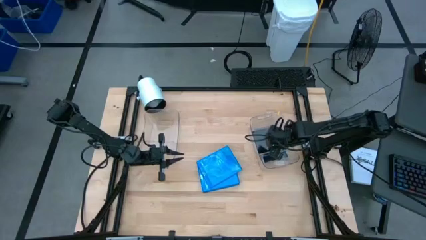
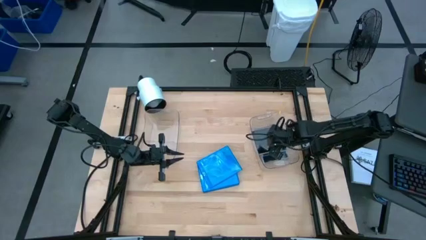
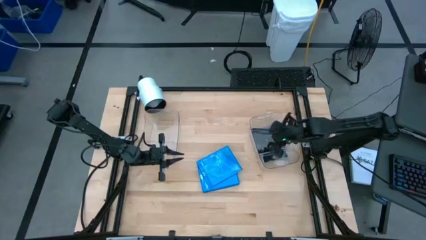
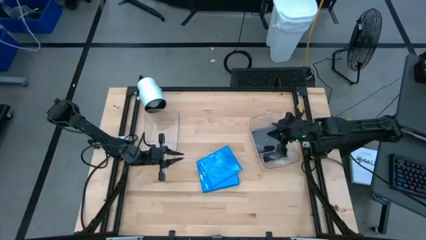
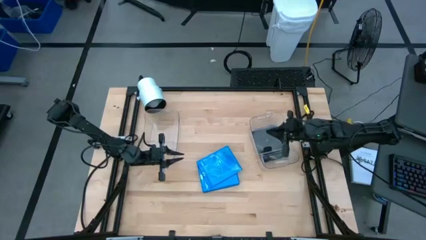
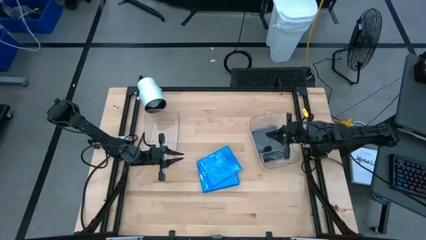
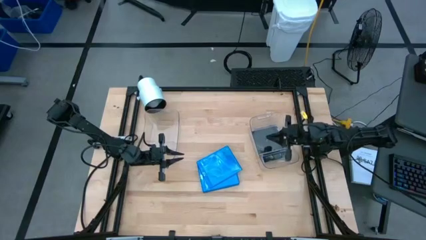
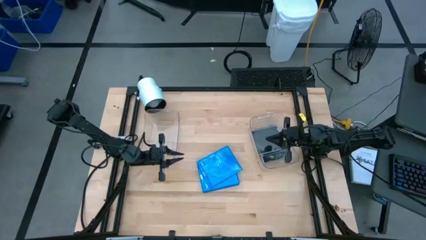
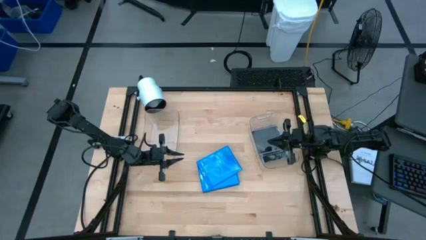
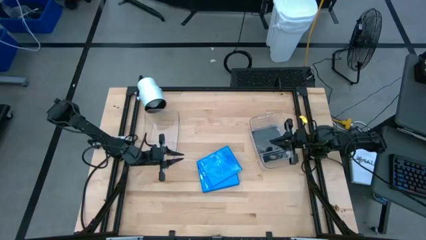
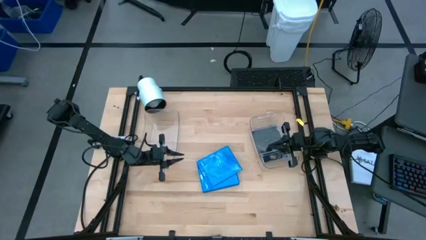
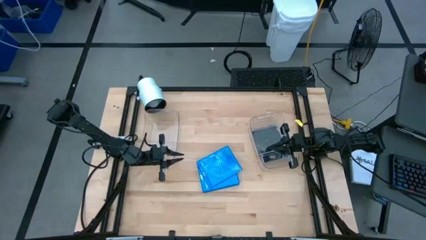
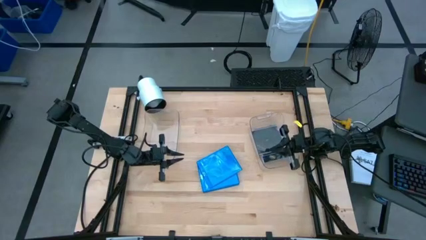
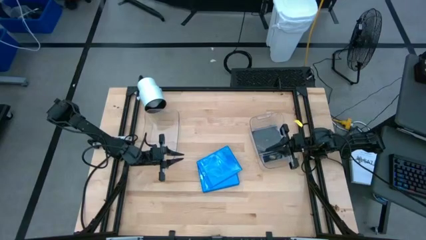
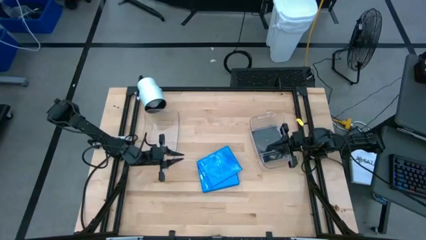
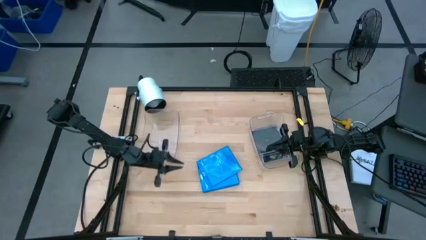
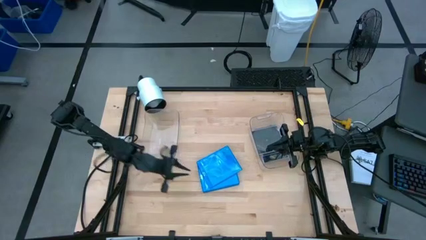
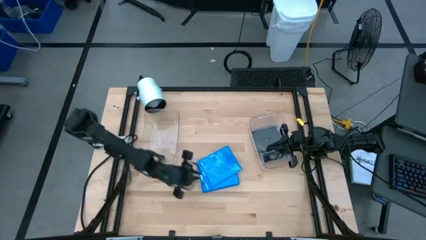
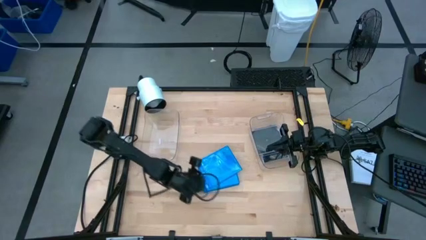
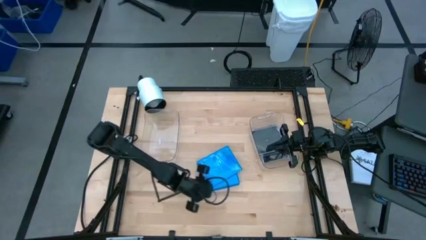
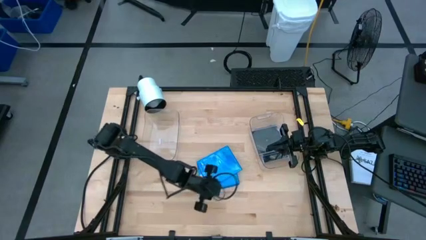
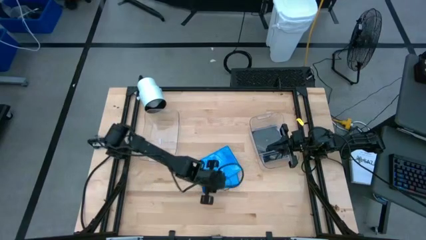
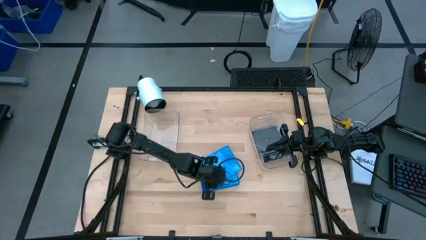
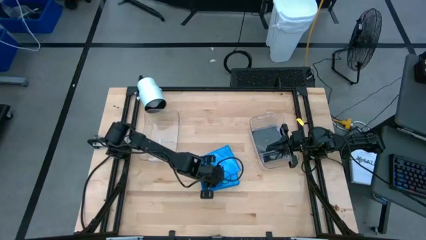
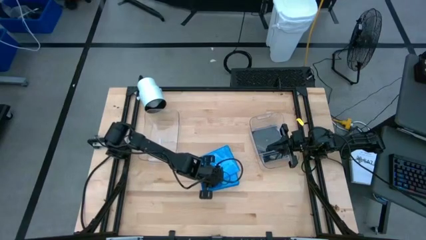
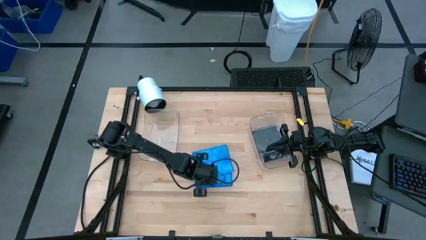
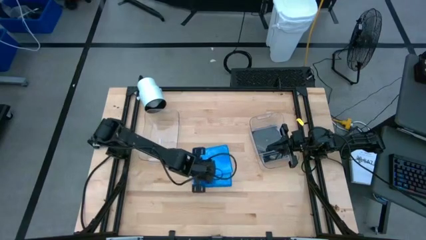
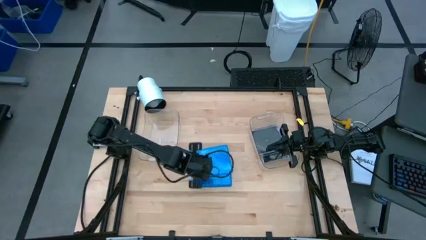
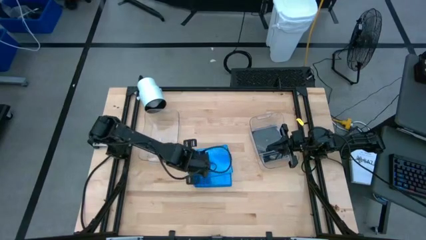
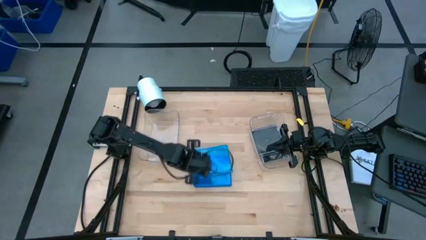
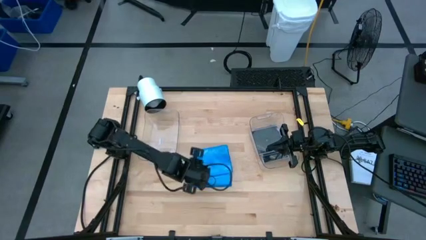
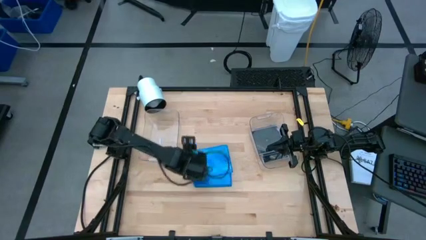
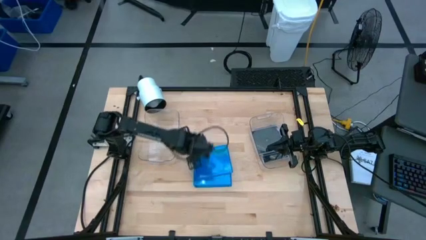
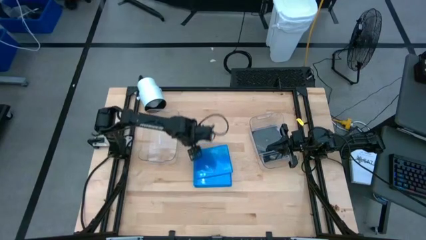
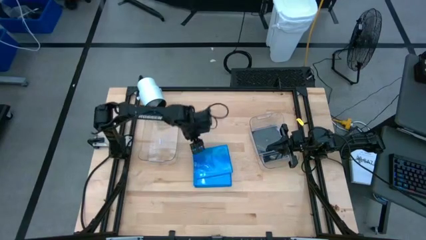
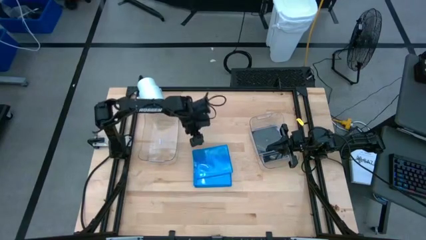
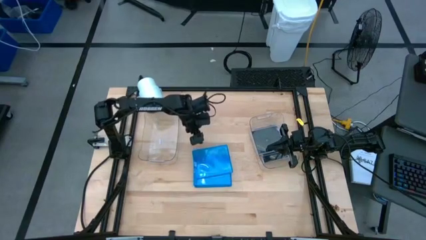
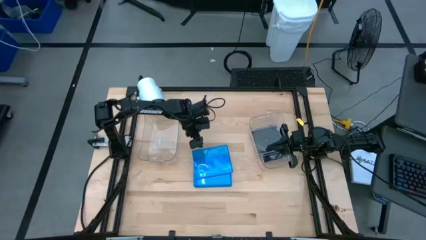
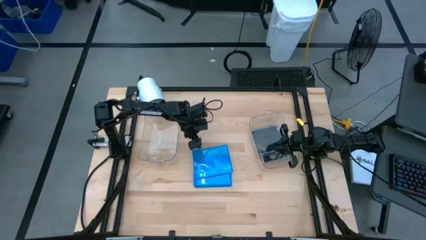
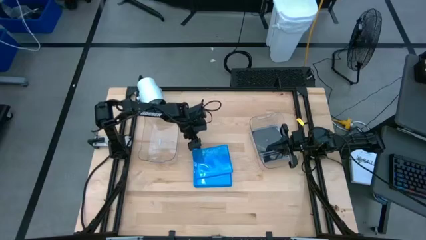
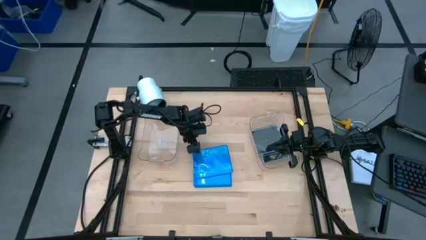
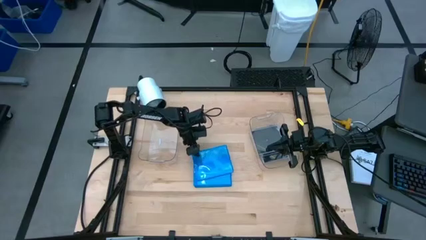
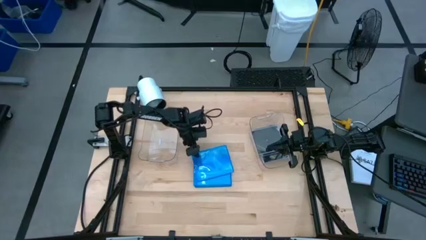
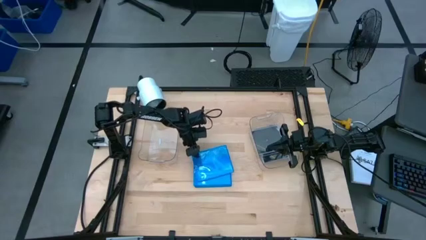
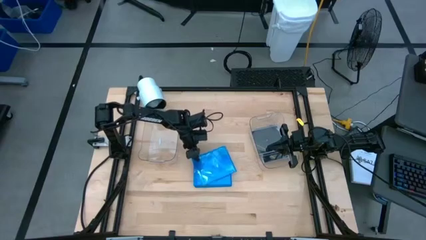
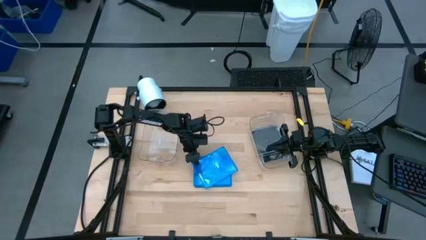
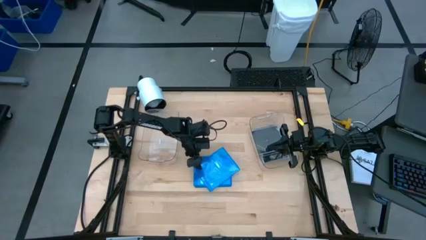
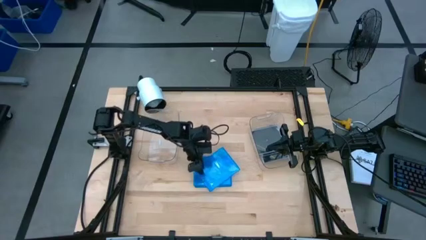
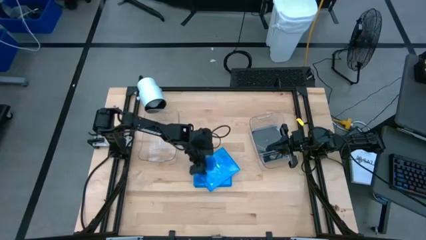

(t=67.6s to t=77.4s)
Task: Pick & place jewel cases by type
Put the blue CD case into the left transparent bin

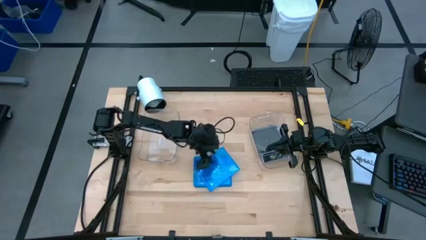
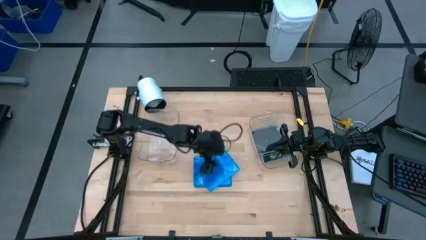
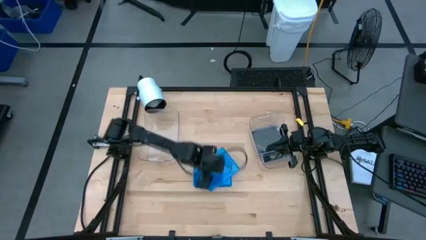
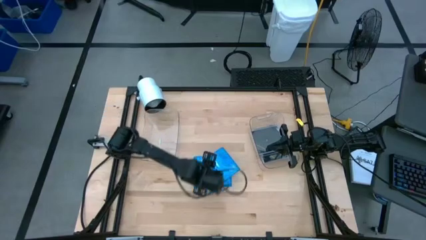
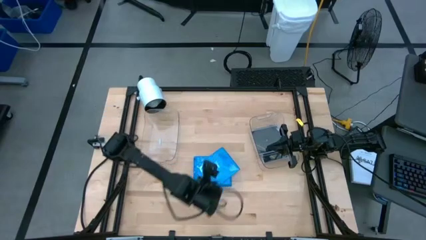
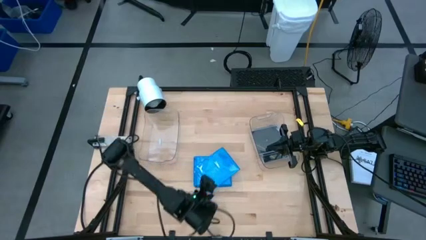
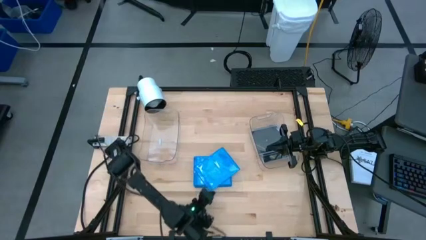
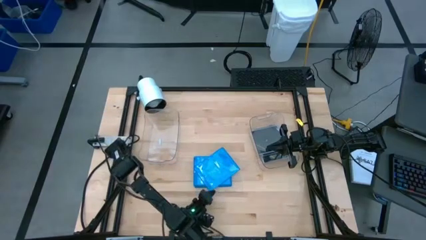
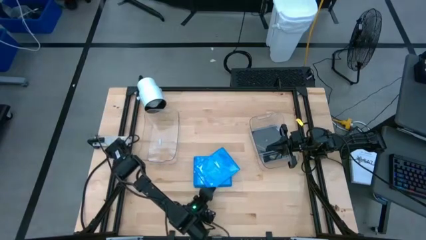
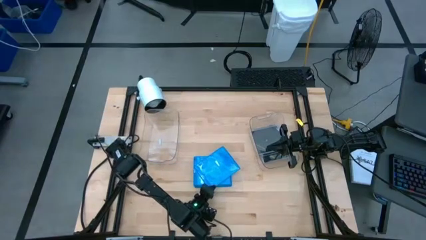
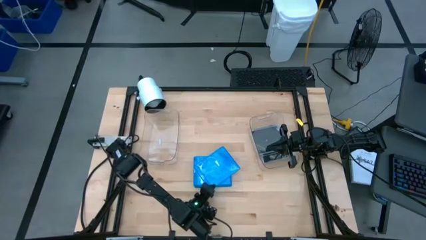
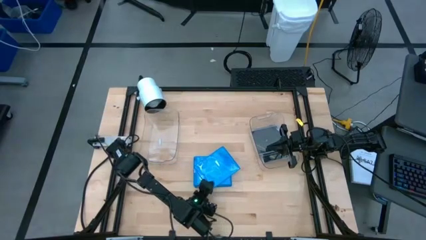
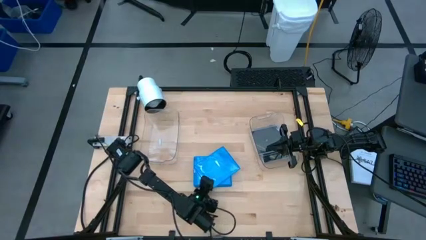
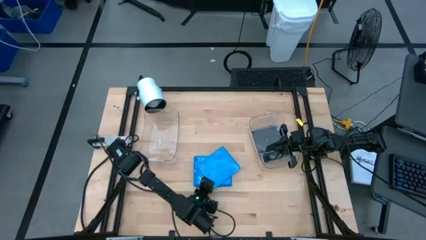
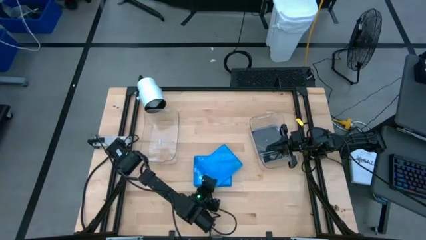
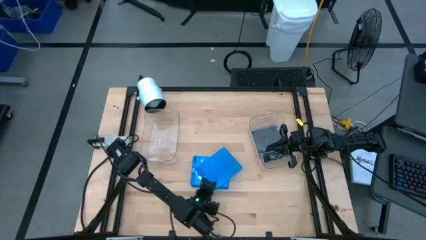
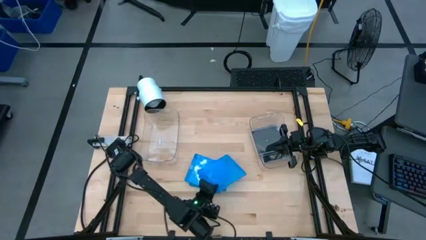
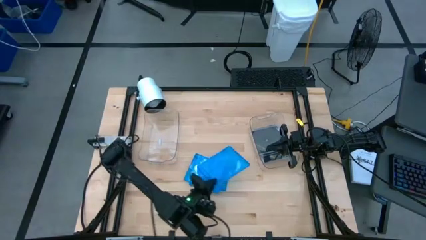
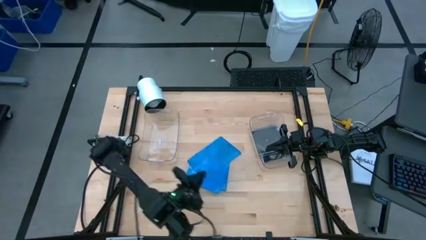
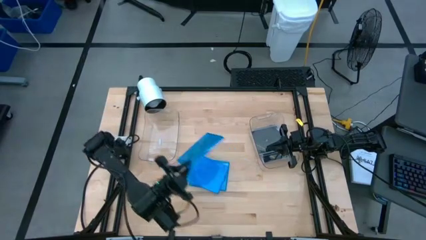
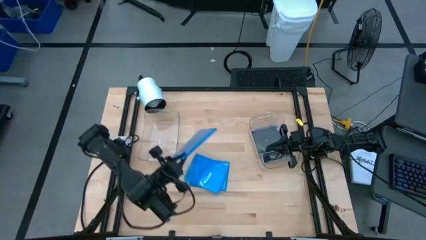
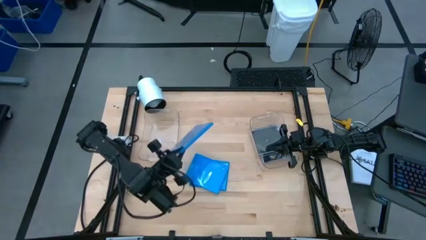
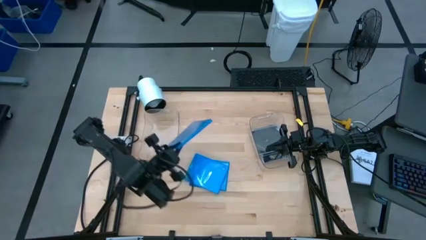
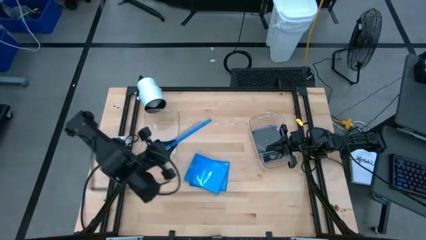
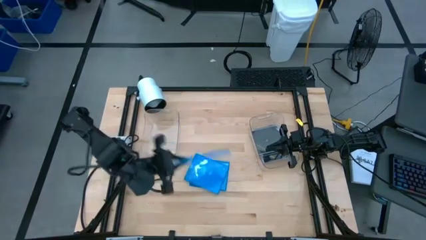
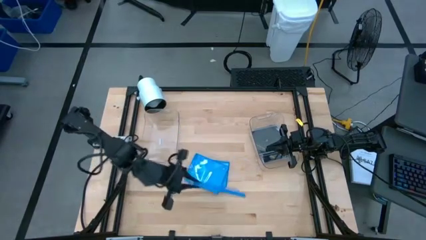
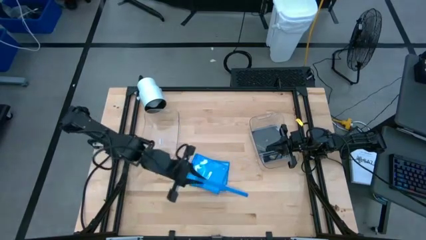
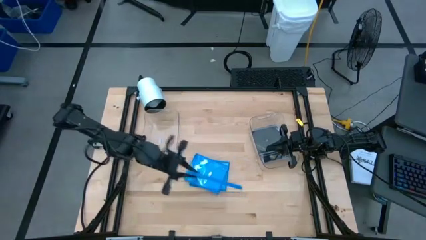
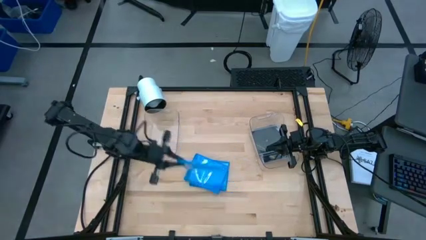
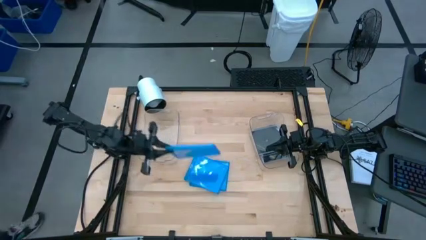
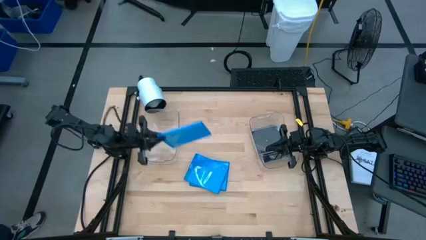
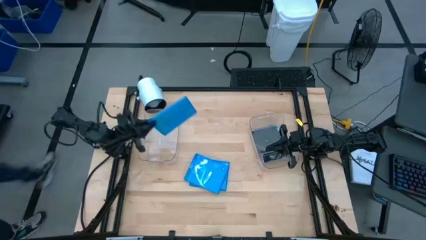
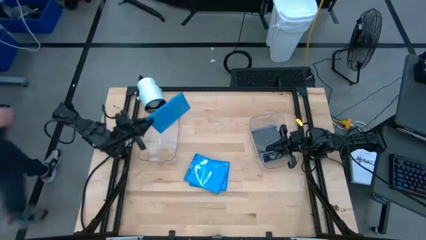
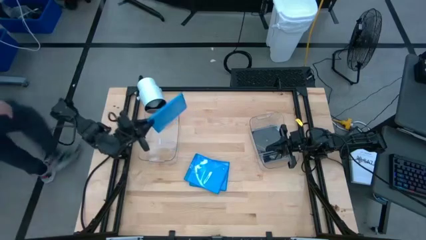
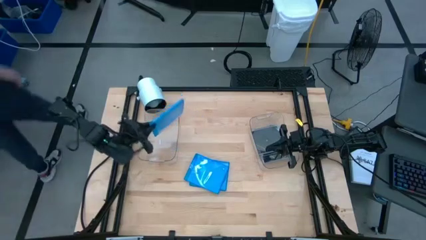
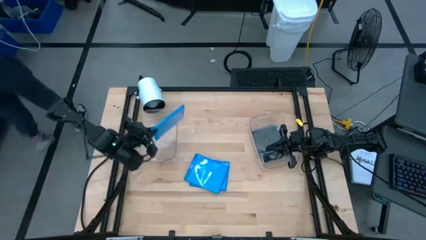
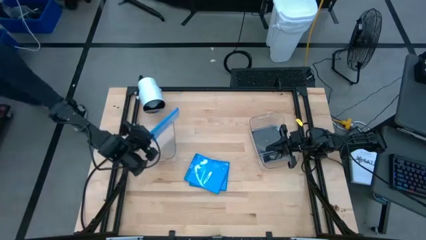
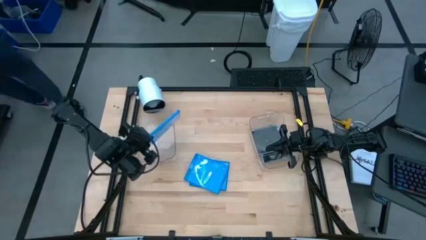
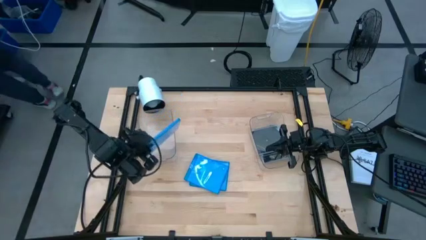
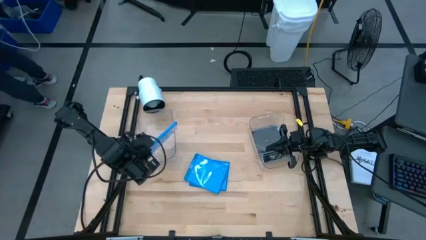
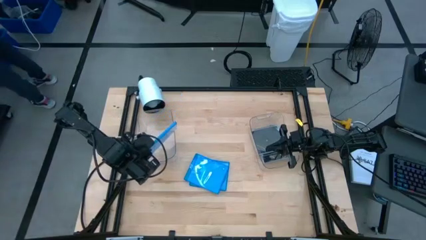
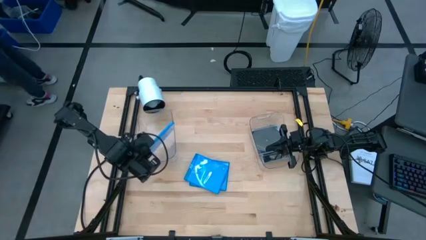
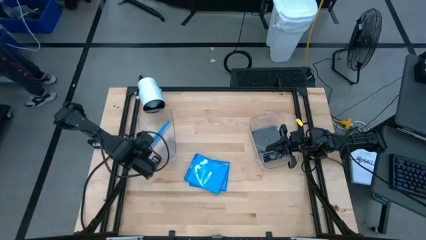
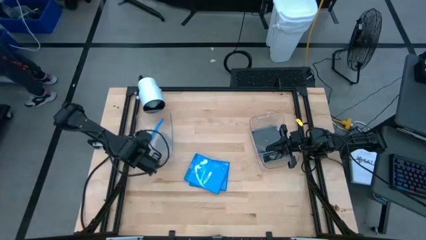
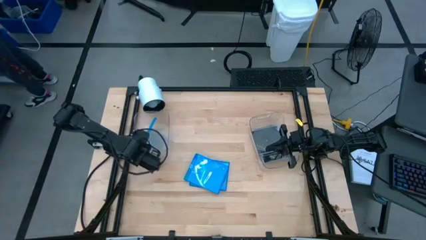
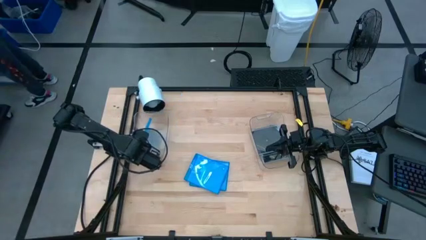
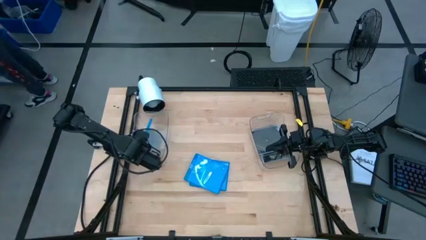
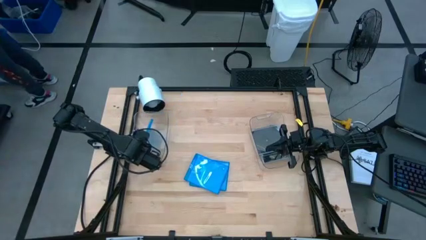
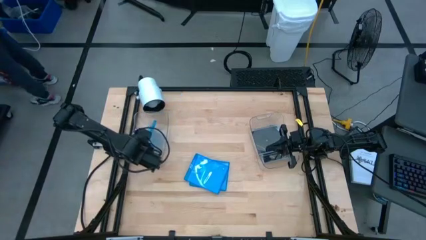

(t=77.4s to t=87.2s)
Put the blue CD case into the left transparent bin
